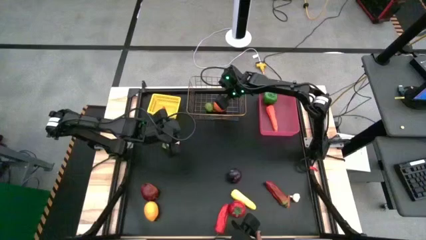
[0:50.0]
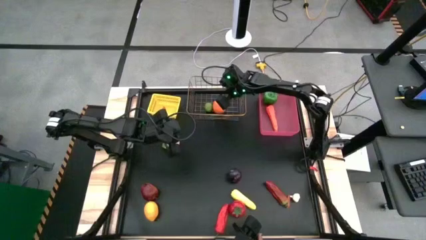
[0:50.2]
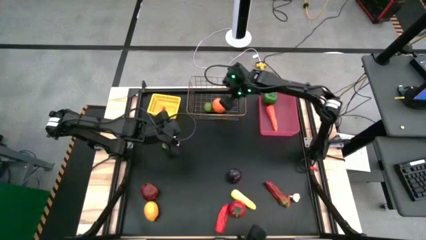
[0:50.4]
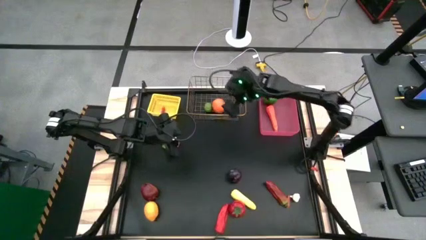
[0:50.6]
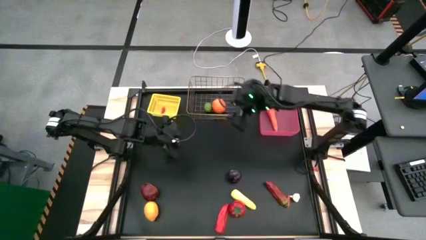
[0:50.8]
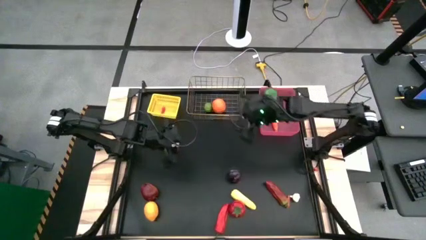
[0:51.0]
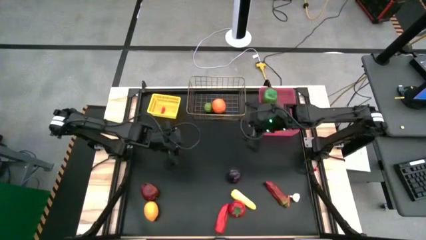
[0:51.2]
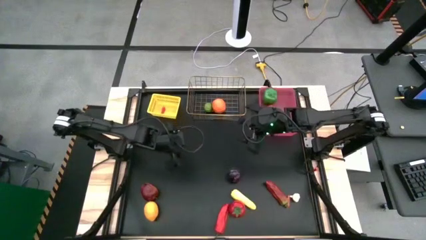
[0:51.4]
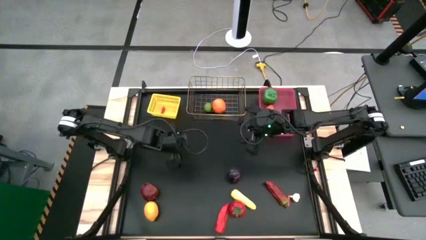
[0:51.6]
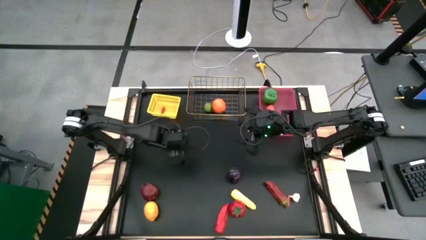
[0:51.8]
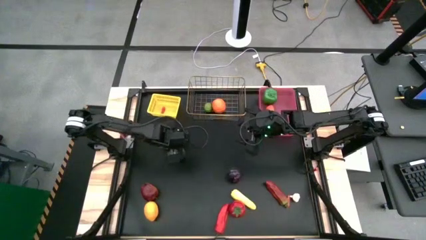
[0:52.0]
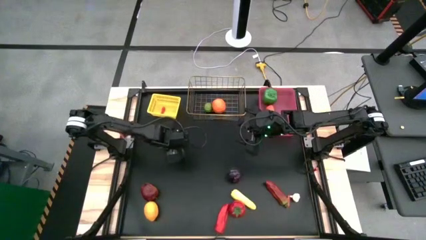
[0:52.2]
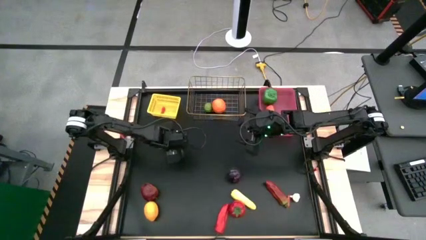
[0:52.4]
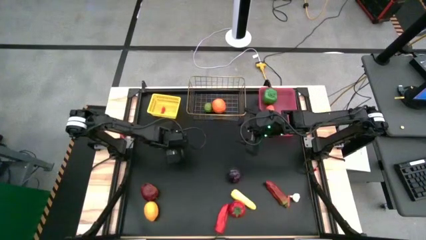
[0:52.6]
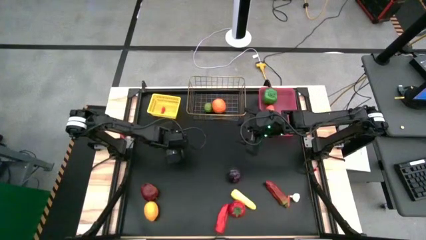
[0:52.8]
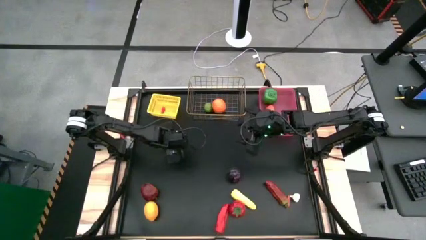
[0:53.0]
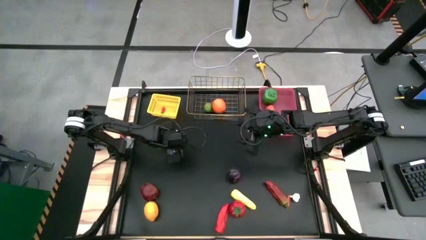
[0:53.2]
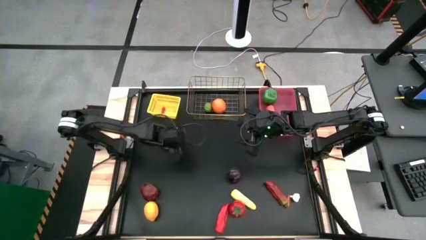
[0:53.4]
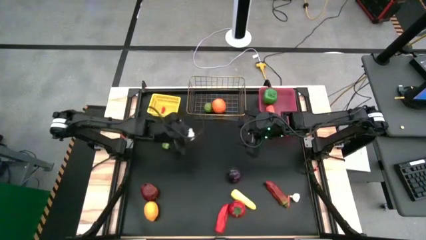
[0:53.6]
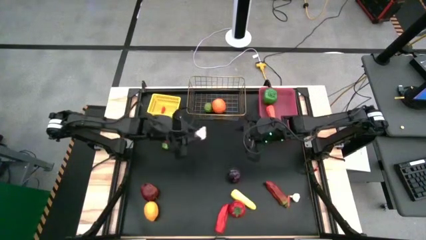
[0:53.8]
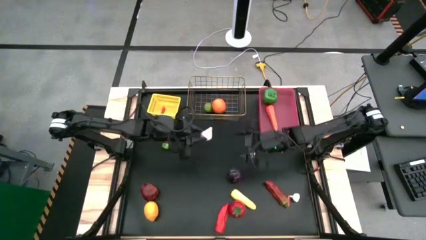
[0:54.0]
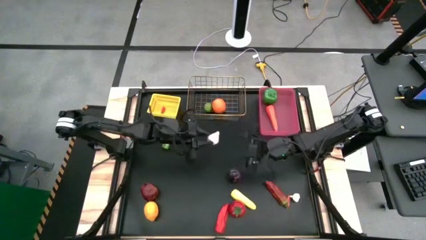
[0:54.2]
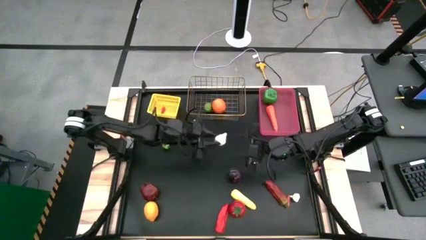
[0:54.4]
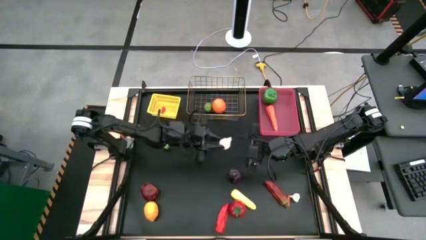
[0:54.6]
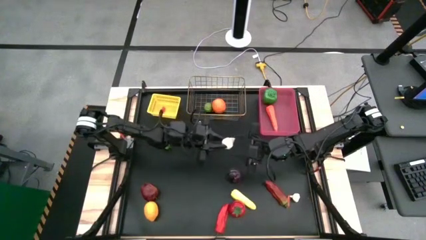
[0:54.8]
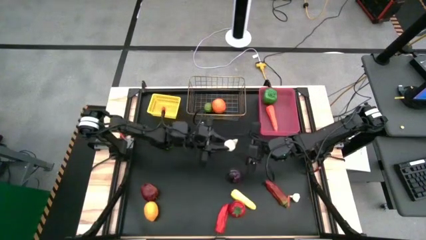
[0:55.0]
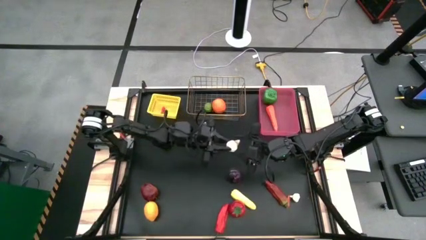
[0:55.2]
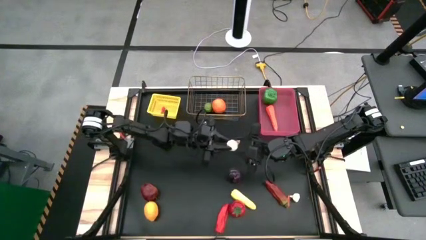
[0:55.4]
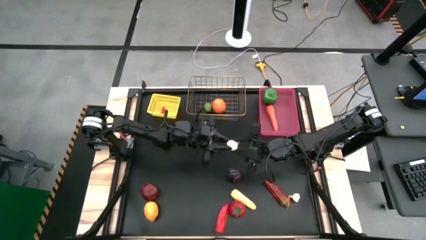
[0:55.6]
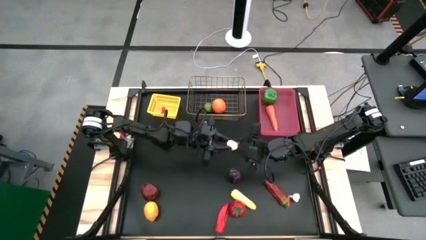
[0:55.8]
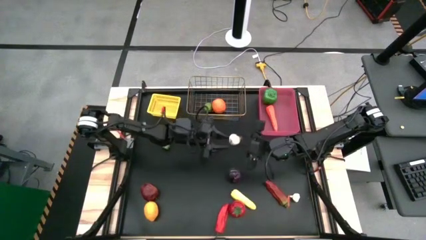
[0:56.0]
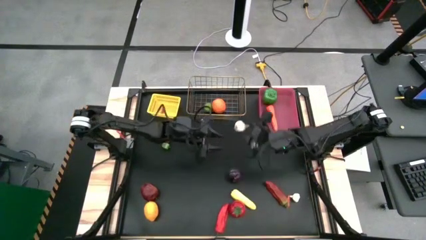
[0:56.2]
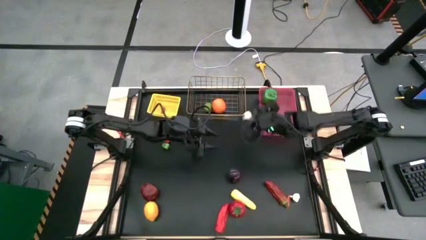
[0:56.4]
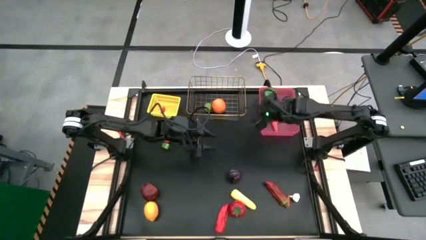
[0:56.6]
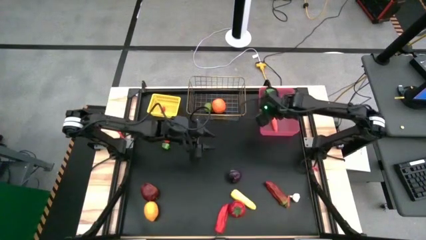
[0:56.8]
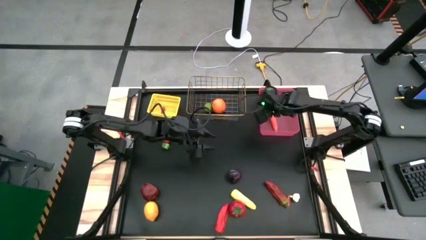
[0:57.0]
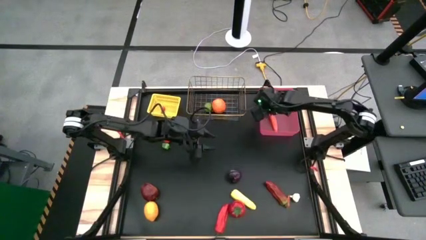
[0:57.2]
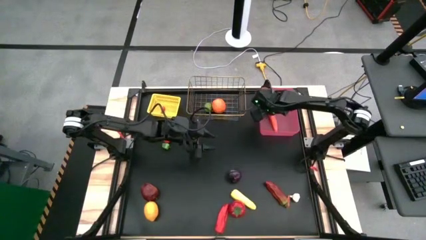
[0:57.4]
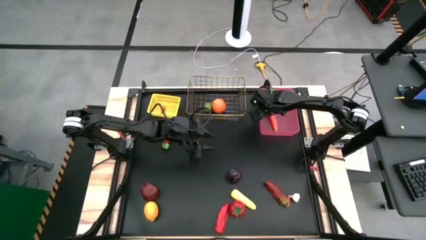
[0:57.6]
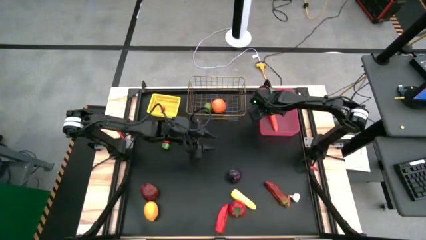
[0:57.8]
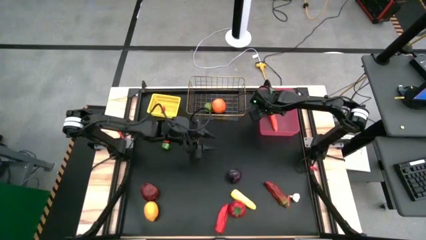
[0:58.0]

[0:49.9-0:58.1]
Task: Sort produce into baskets
Put the large top white garlic into the pink bin

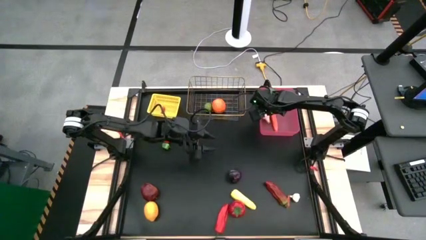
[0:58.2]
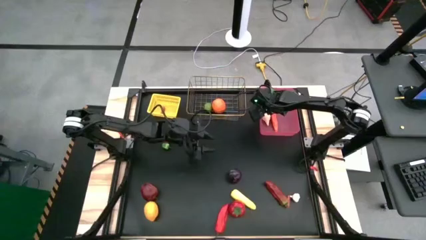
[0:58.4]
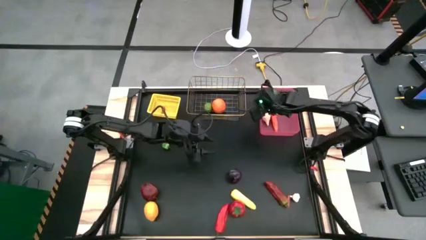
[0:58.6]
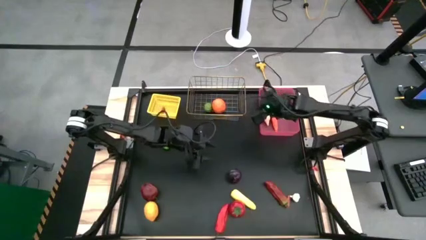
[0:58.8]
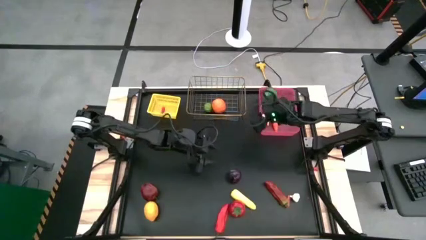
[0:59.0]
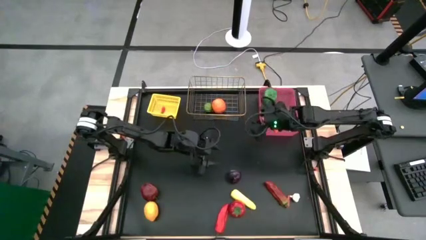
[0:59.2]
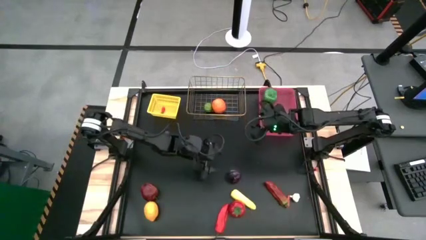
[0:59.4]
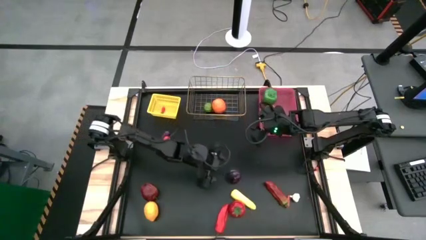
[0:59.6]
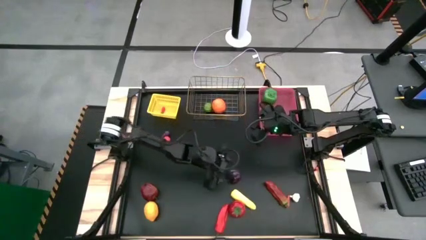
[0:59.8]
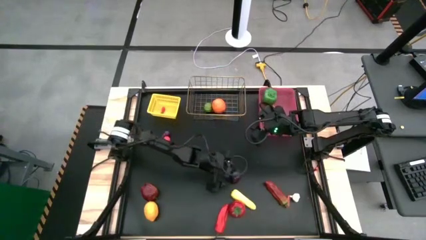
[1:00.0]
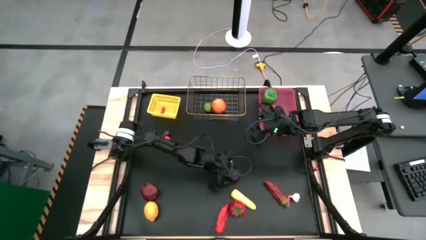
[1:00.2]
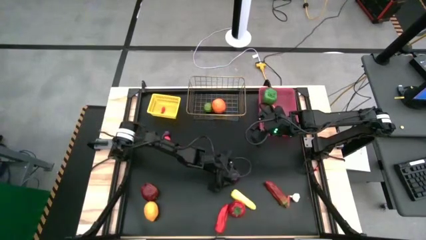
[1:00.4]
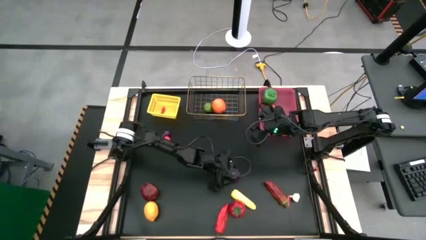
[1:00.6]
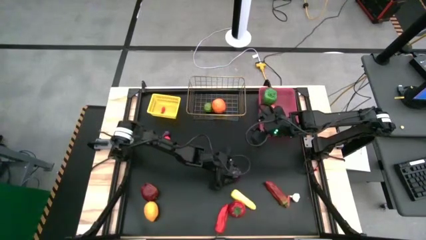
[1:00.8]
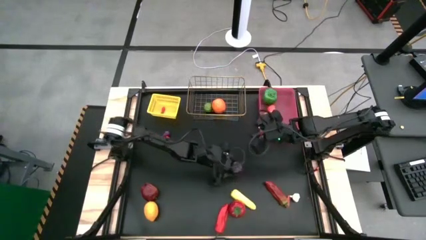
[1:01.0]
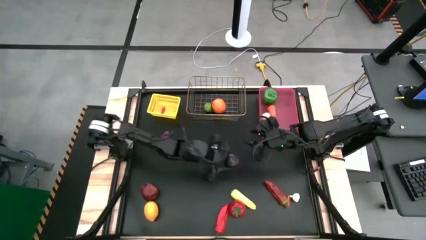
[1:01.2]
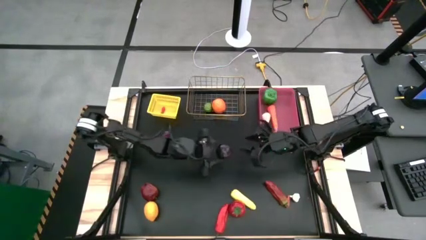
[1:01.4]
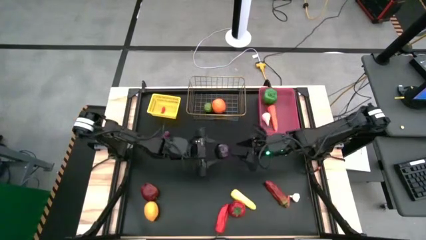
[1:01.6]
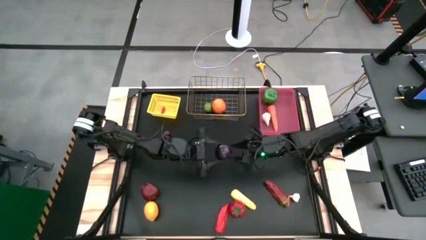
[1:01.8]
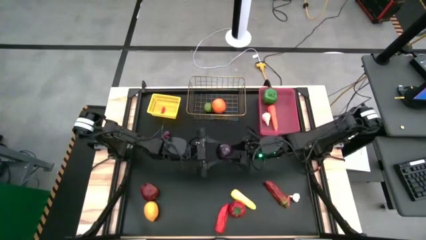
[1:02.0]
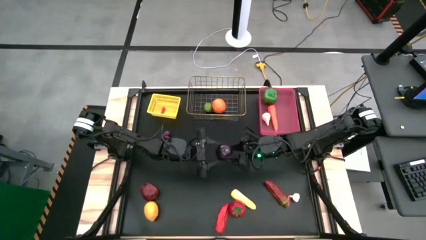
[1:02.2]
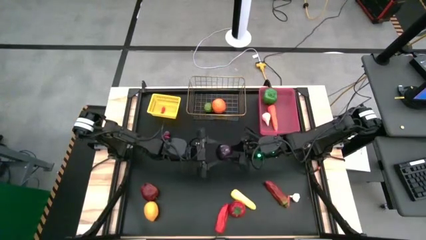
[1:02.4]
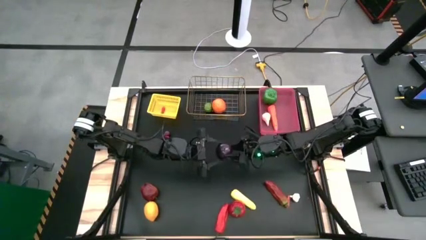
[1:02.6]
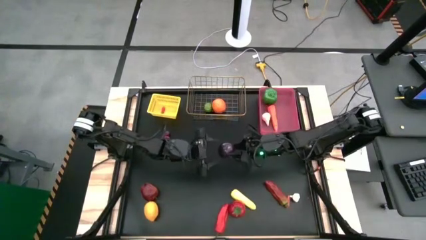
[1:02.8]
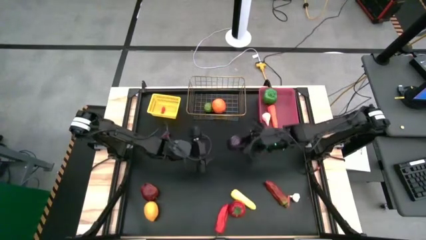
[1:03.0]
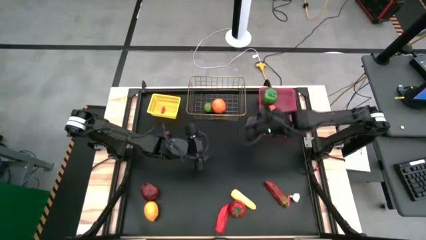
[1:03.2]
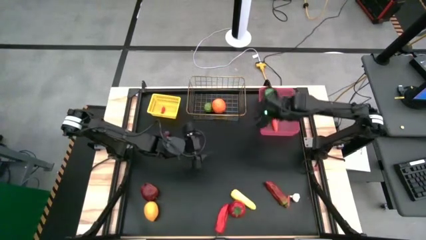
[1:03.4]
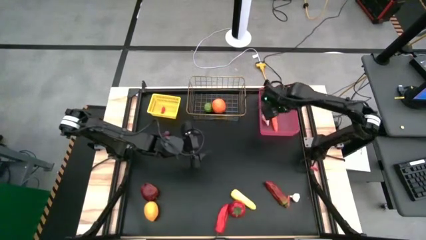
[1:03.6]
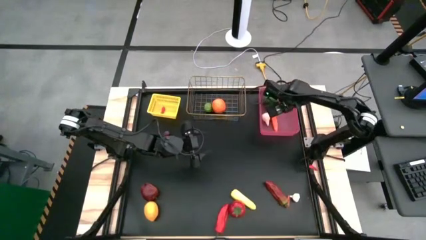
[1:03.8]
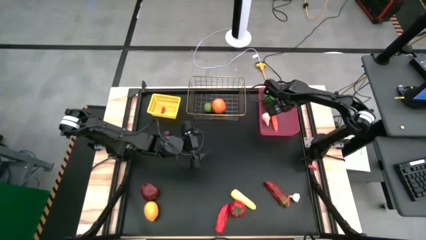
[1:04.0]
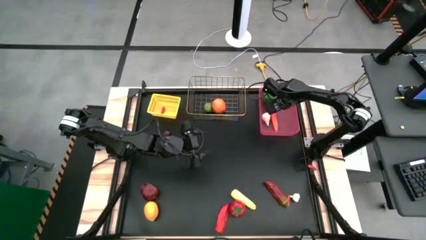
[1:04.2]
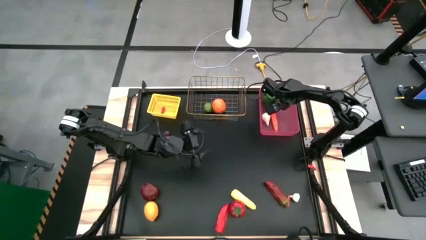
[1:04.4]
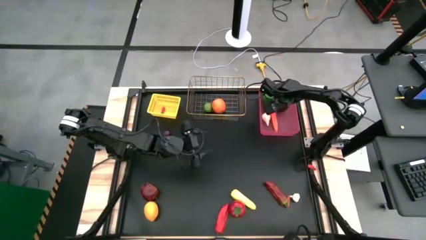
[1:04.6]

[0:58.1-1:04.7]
Put the large purple onion into the pink bin
